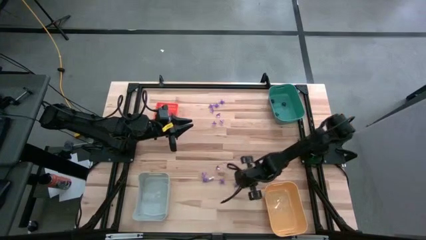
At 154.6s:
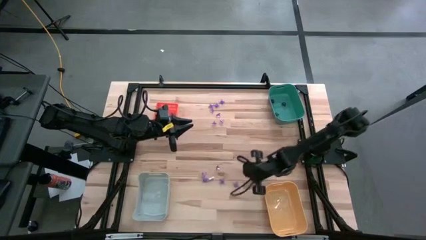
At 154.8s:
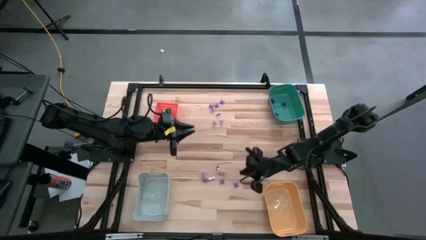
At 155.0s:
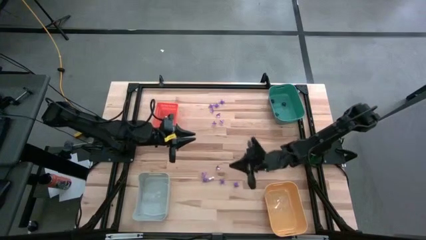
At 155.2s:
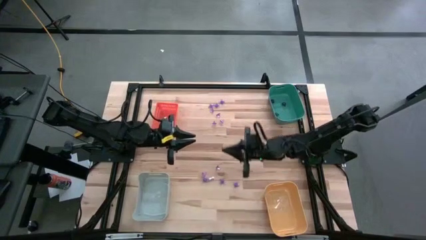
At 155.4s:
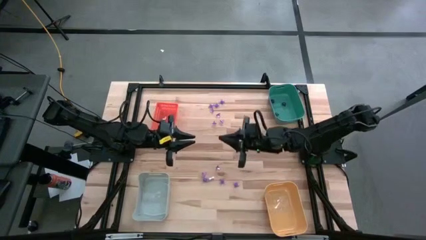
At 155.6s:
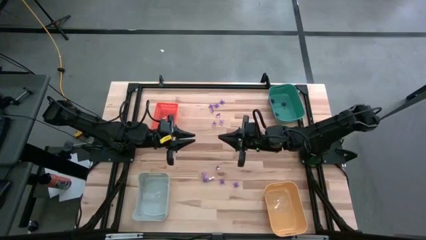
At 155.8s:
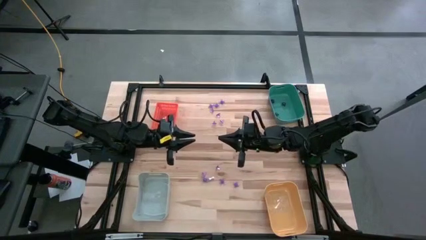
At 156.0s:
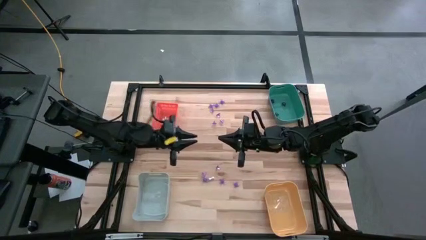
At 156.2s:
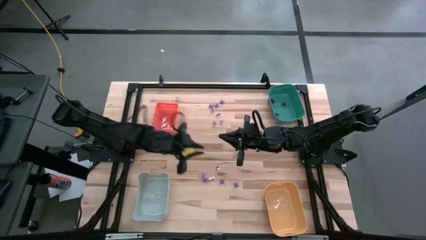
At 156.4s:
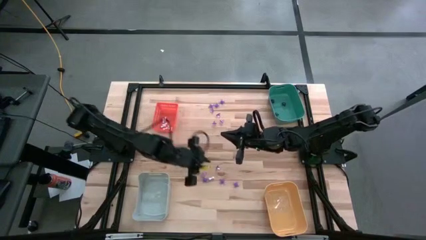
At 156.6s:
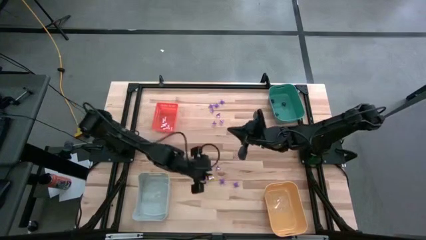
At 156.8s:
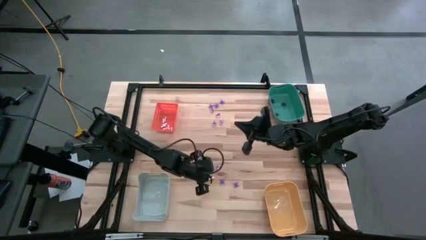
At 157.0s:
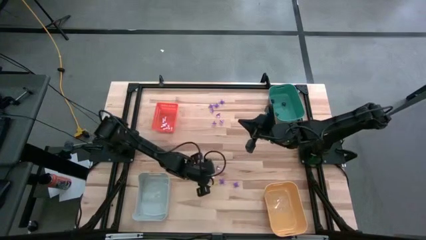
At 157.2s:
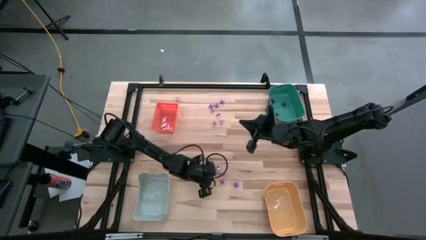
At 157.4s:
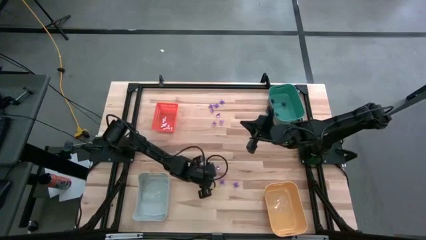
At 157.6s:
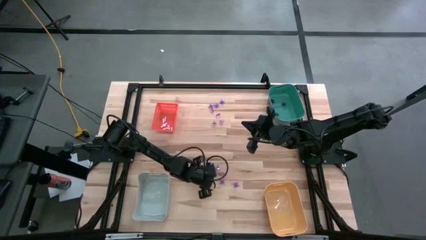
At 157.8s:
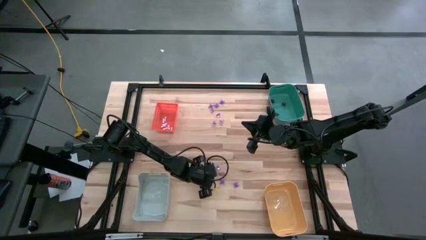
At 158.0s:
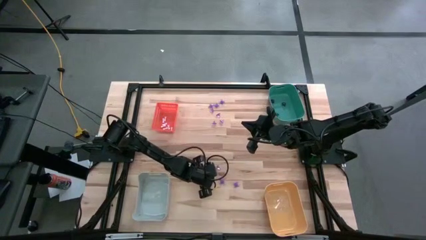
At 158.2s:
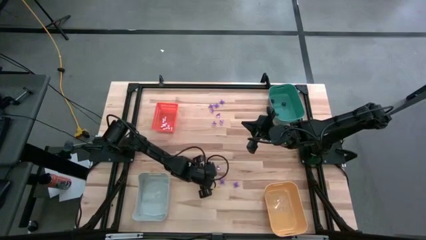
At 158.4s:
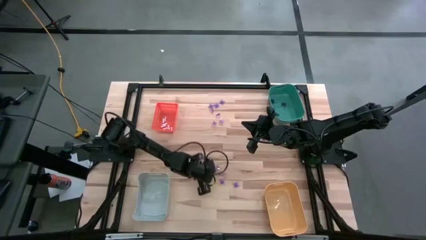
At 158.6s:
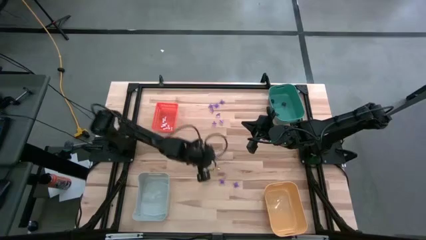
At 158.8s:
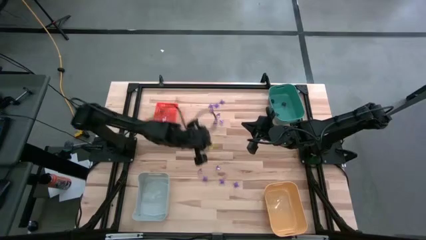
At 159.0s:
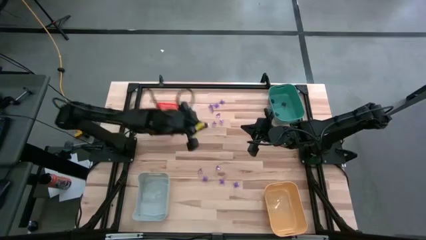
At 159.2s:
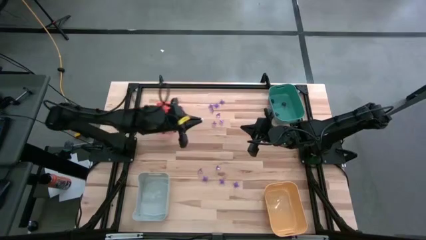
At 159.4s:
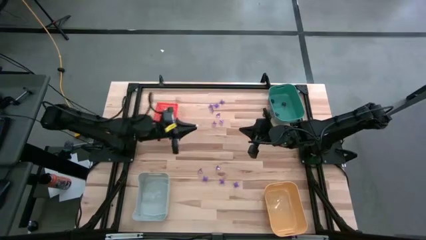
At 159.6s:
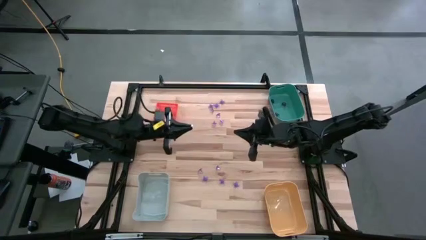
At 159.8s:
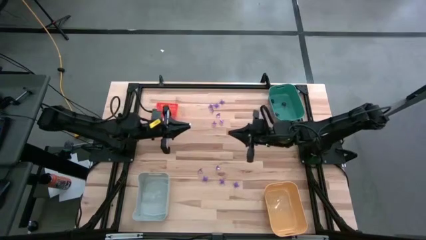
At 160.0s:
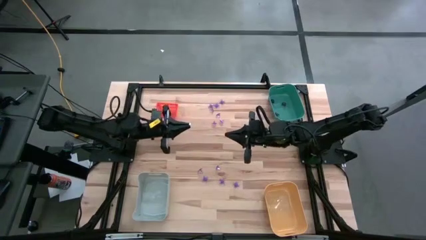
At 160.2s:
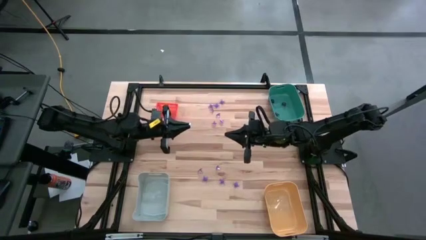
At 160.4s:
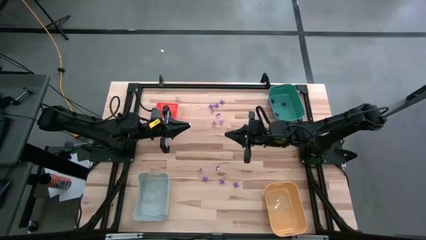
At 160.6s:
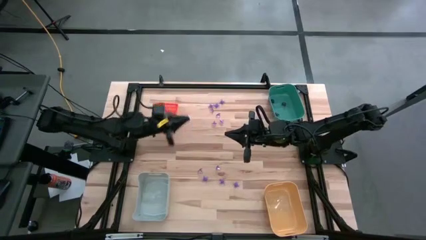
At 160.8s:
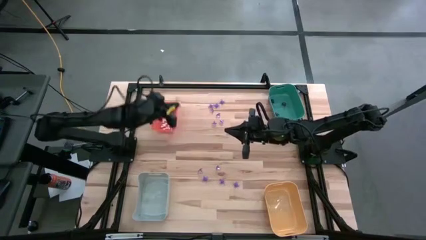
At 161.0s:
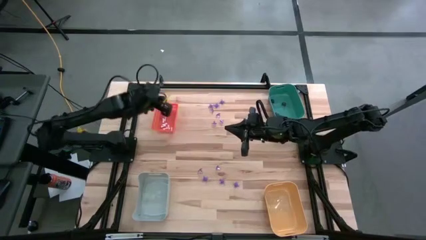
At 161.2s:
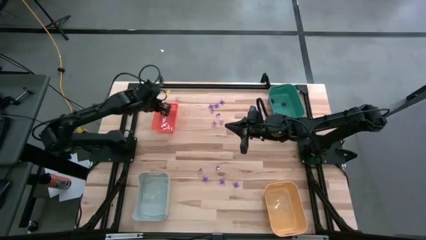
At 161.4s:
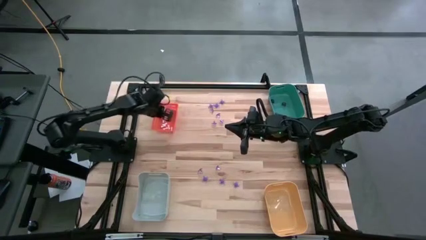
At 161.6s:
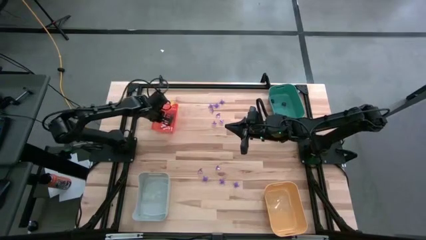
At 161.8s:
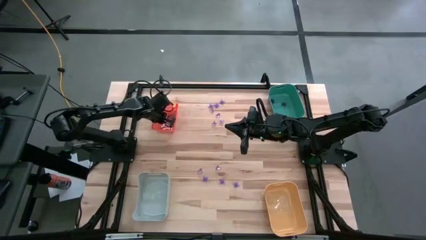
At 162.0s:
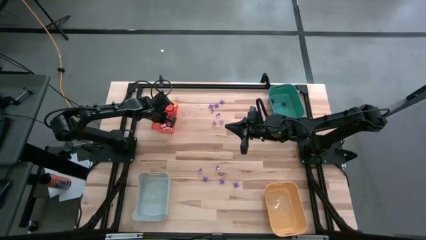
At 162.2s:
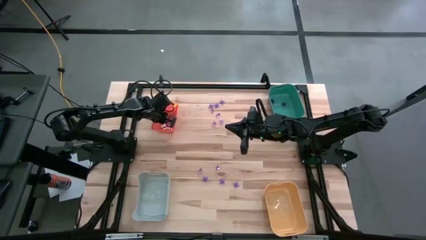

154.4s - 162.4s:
Task: Sort Halloween decoration
Put the white bone toy into the orange bin

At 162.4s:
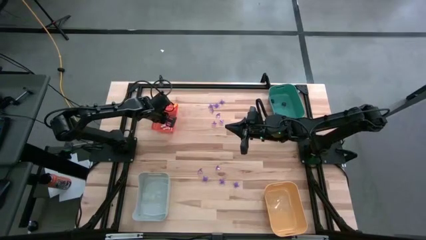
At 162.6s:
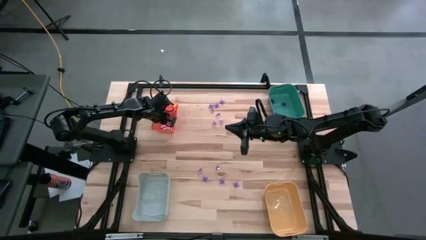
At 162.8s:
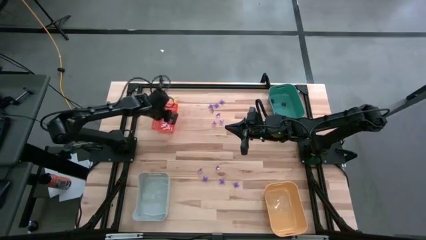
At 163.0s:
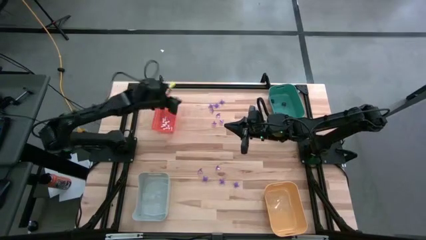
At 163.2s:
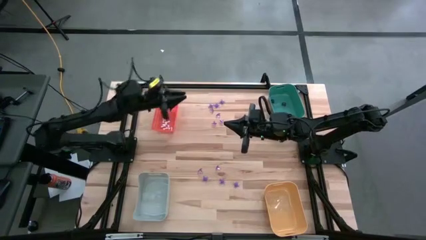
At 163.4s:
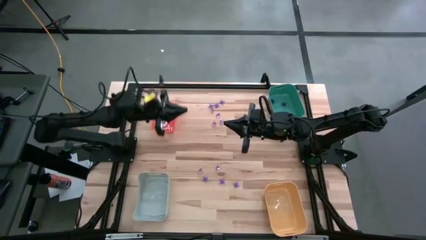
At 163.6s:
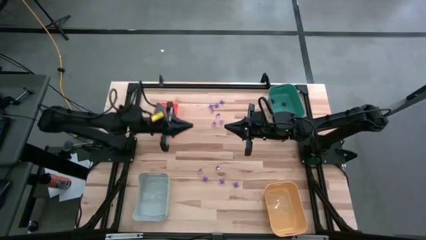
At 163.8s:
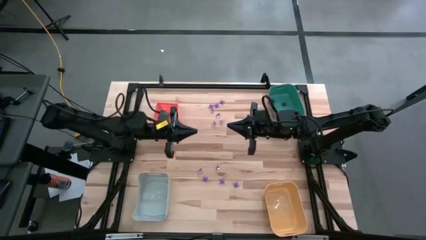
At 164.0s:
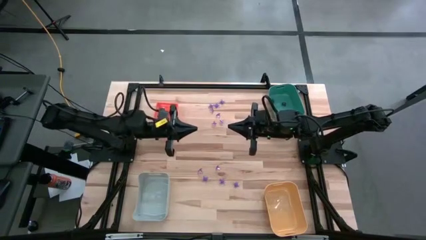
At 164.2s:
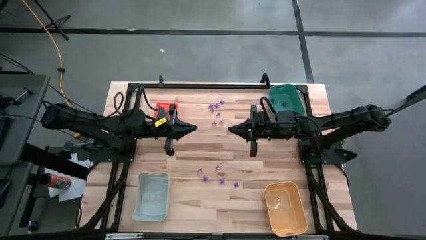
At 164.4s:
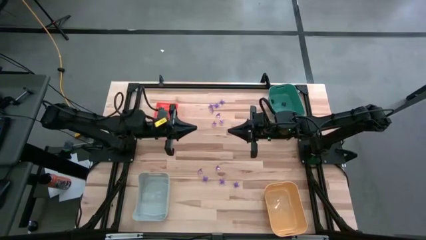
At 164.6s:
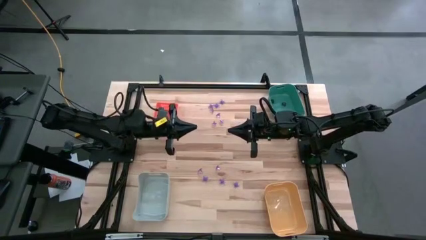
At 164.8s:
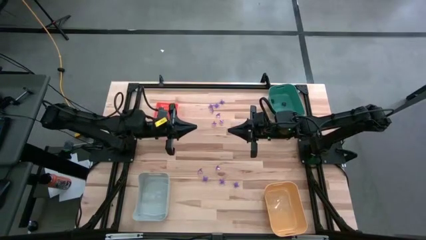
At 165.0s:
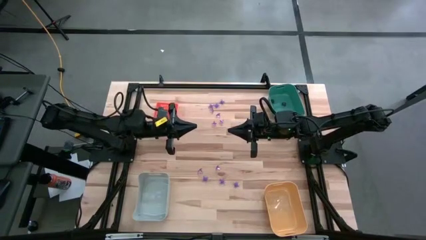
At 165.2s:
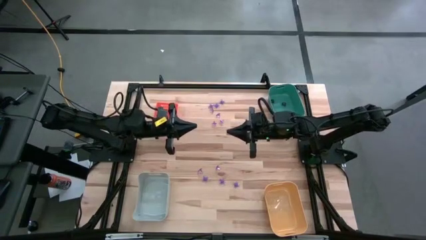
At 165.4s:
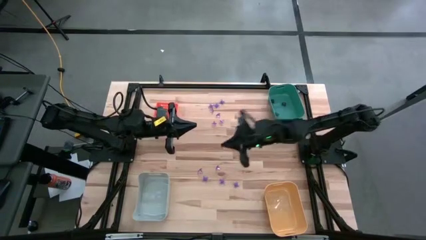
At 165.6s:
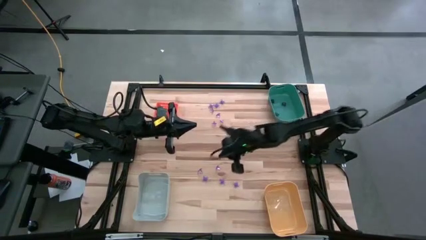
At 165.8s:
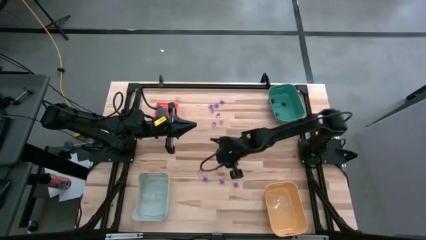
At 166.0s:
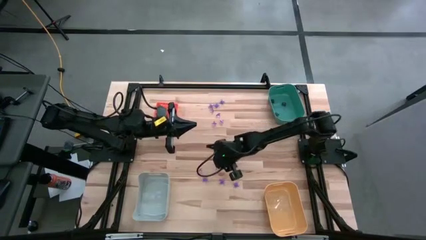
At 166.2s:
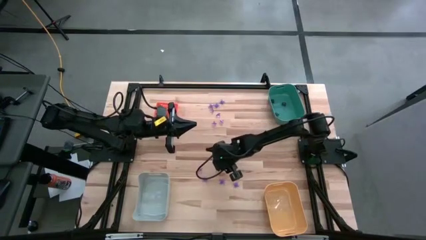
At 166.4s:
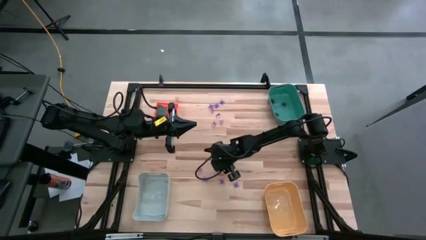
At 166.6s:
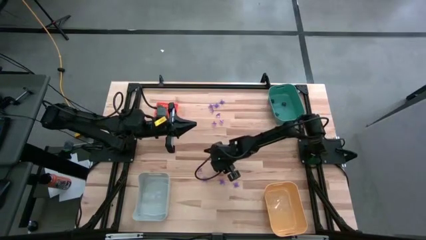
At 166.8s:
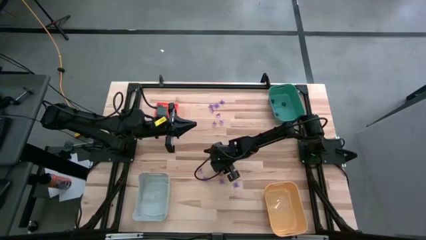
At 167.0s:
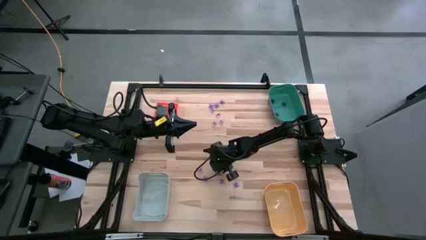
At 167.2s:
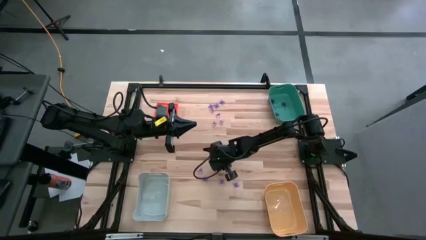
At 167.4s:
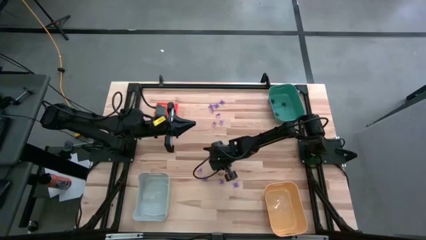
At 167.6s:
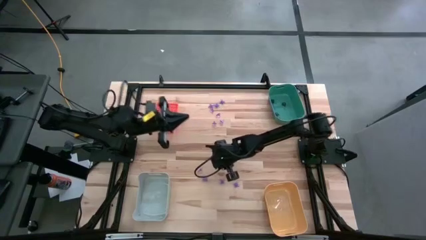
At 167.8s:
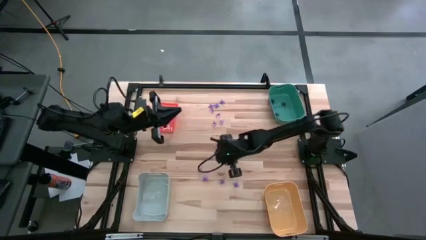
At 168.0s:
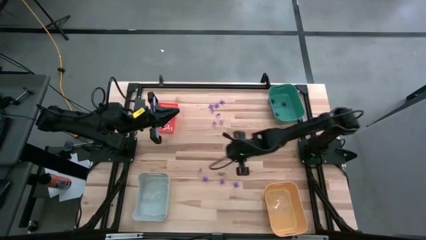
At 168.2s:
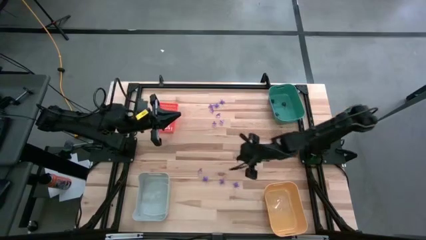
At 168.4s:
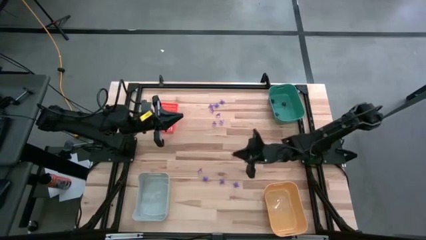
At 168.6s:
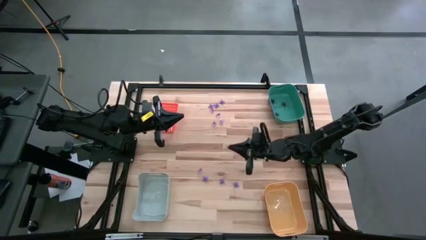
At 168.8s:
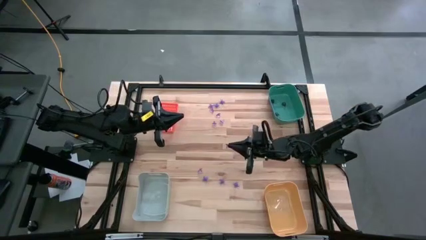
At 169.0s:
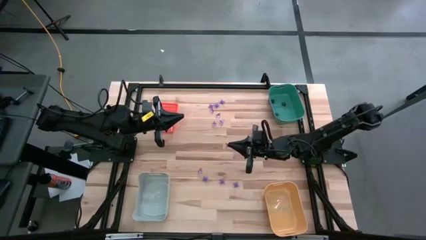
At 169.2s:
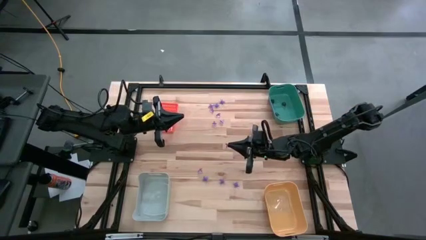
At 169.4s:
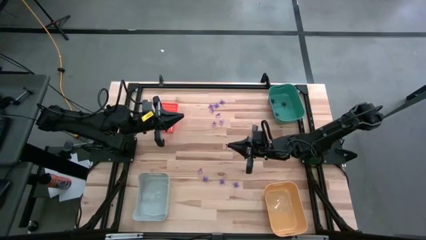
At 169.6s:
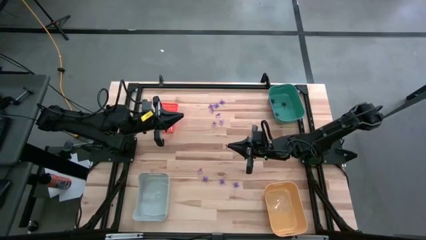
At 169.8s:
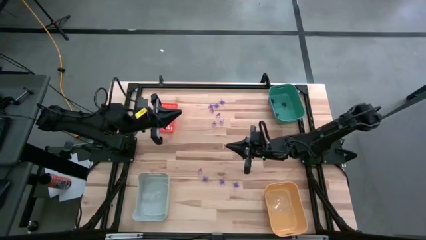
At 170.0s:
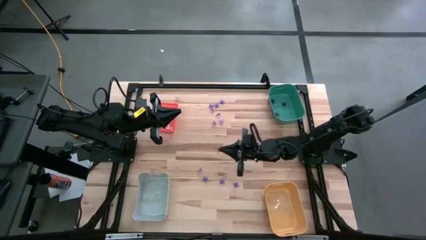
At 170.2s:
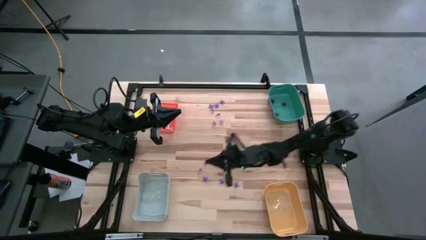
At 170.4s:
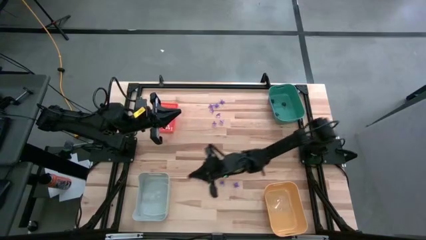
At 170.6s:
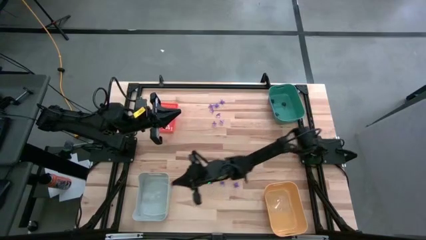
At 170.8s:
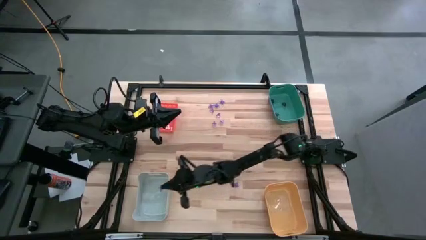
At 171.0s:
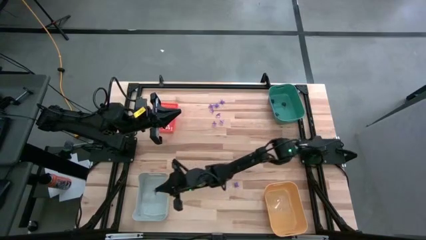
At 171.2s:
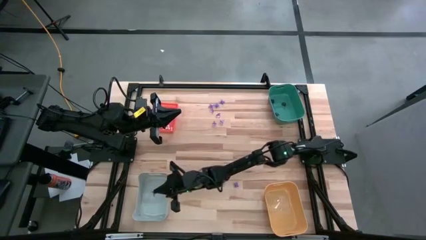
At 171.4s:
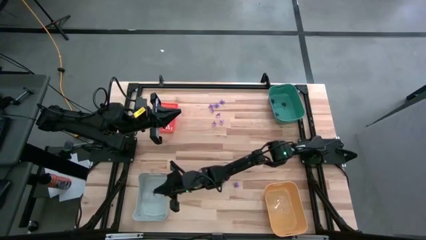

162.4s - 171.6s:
Put the violet hat toy into the gray bin
